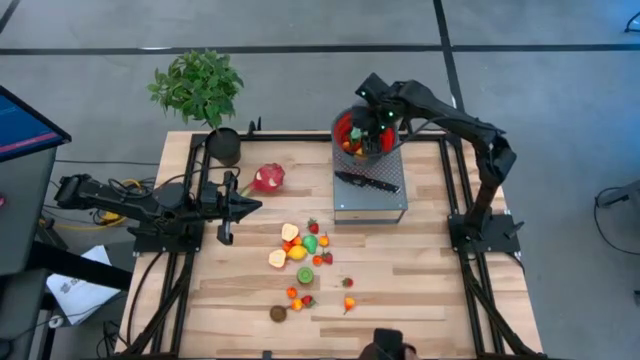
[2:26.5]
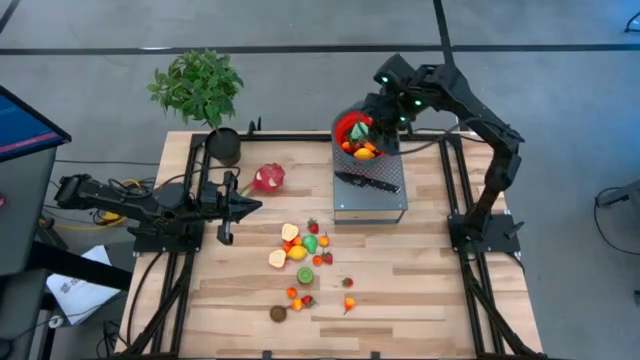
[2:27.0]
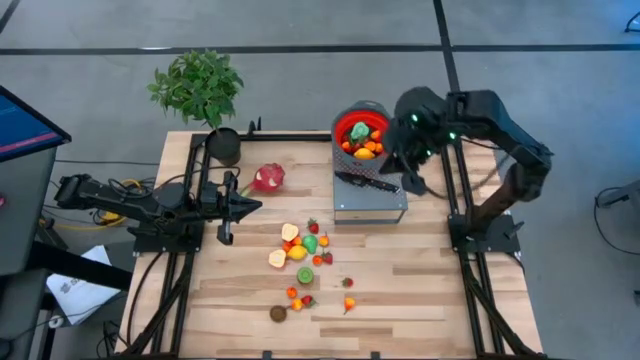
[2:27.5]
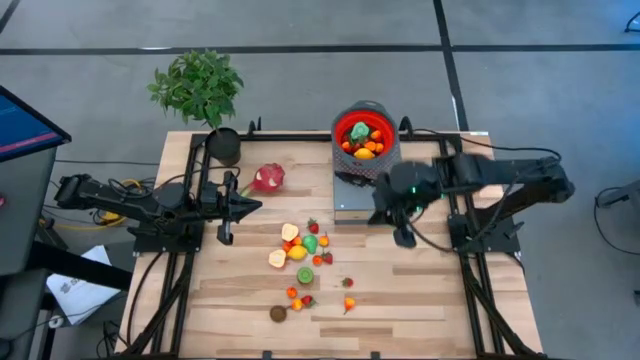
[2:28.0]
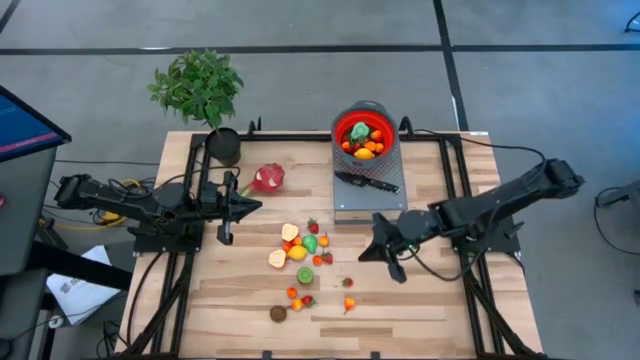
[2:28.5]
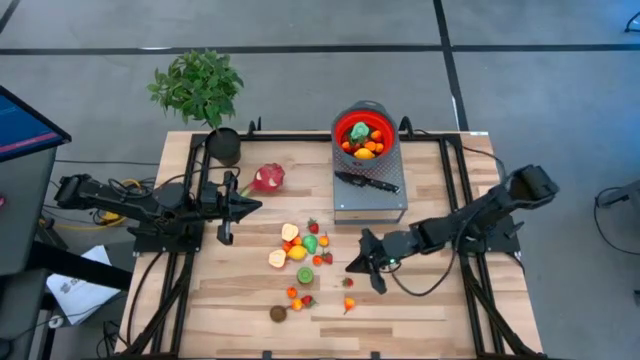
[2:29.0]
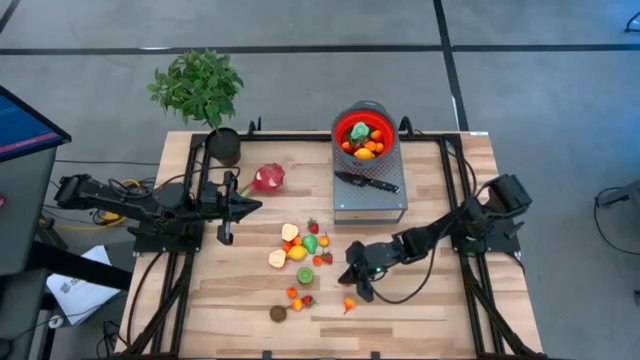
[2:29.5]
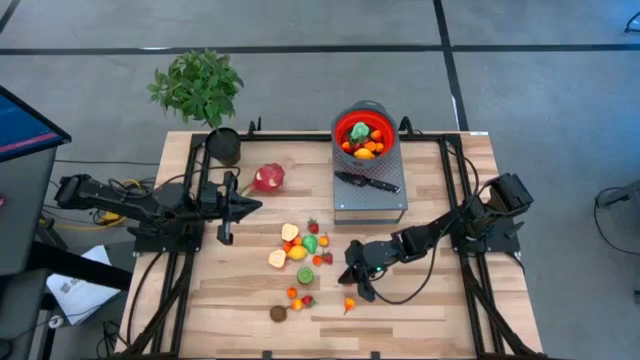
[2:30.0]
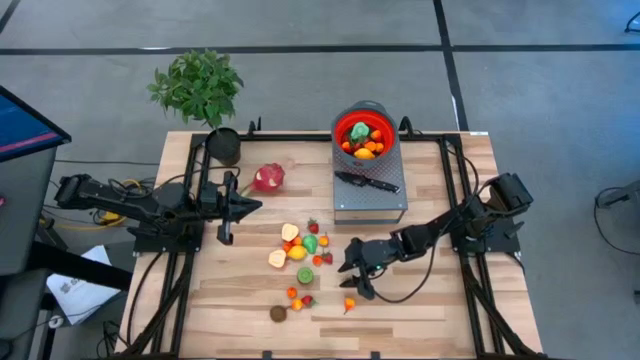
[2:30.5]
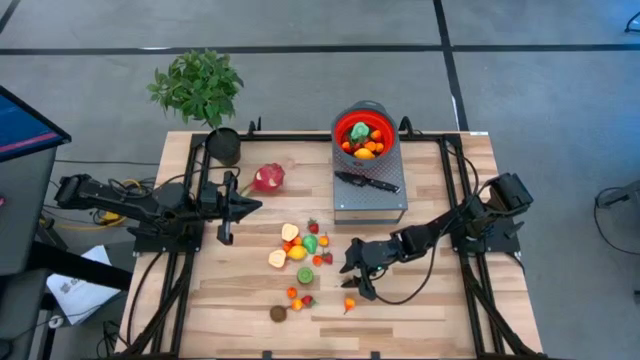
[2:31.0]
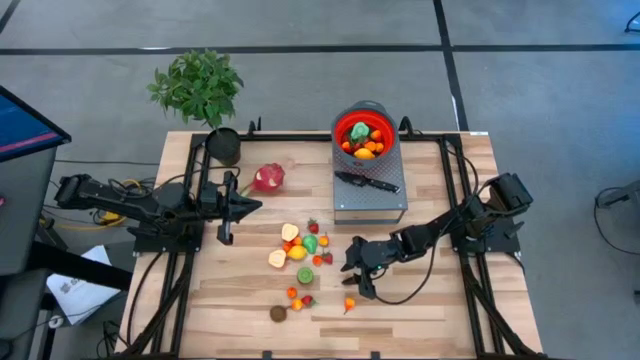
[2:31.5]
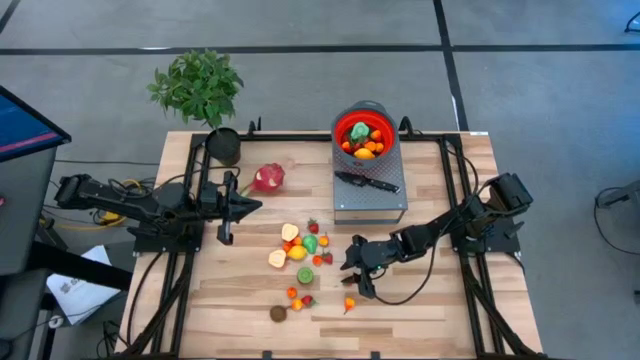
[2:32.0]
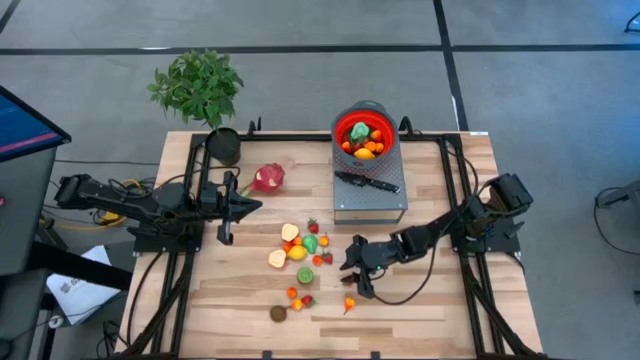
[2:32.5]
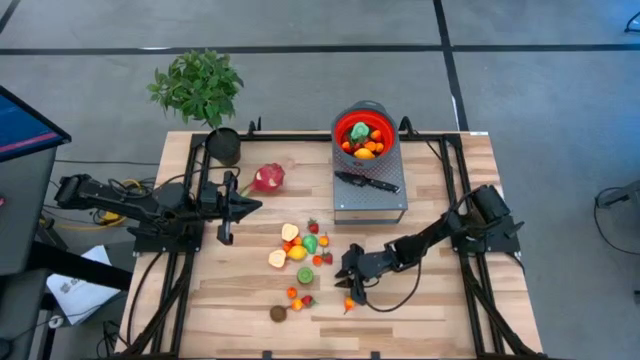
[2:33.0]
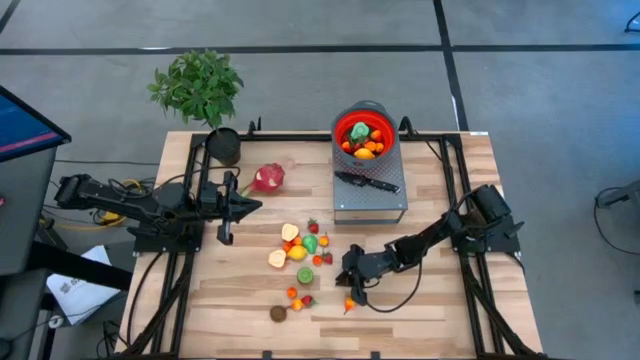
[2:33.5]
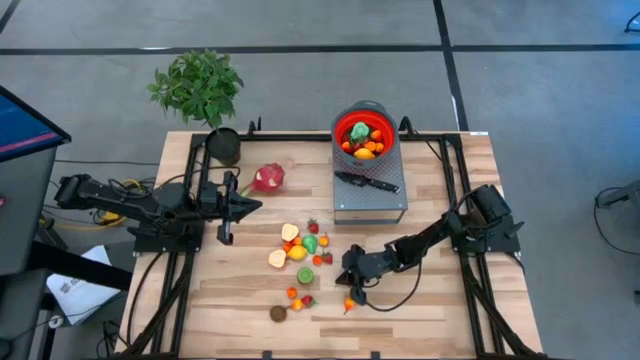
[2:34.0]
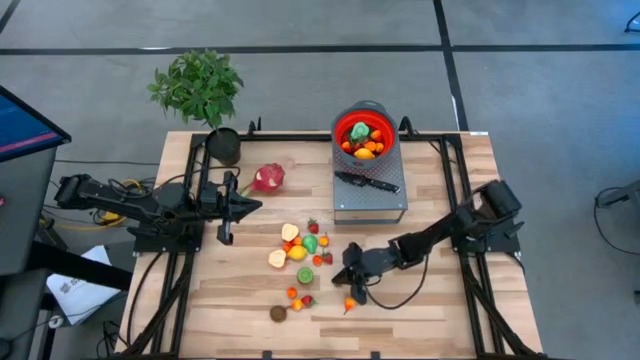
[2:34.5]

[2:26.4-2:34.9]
Task: Pick & Place Fruit
Put the strawberry into the red colander on the shelf

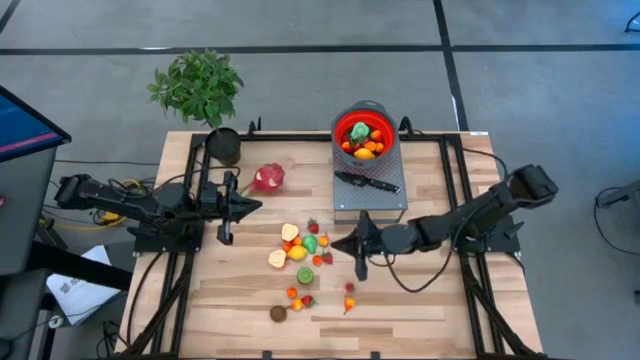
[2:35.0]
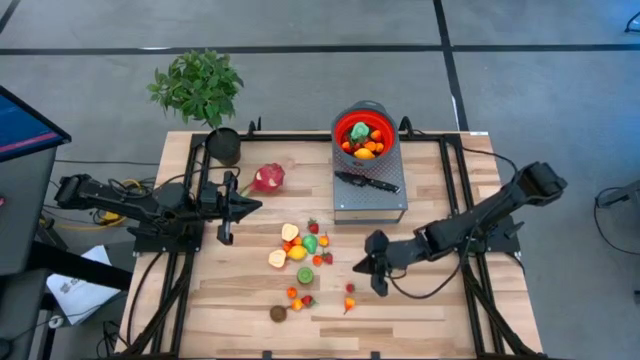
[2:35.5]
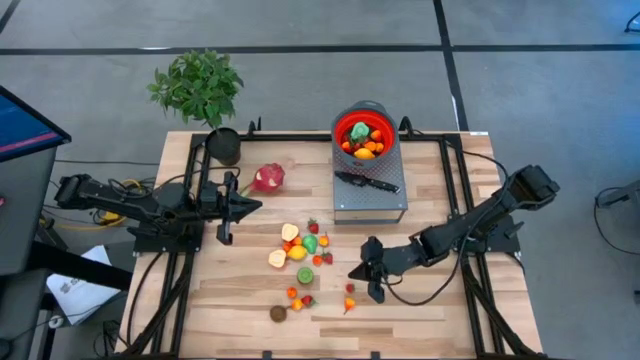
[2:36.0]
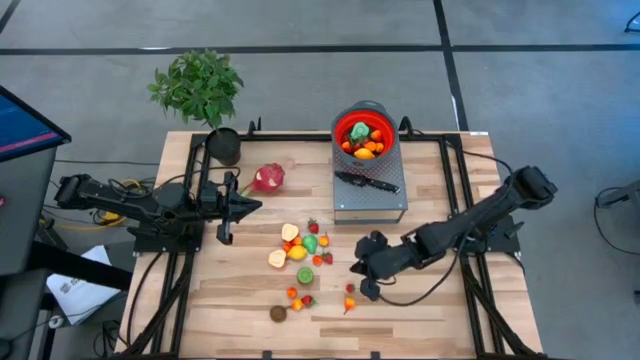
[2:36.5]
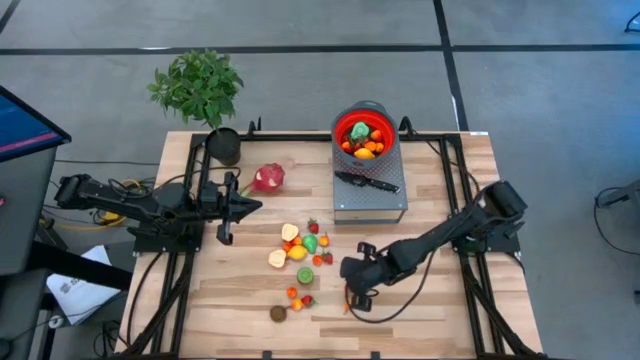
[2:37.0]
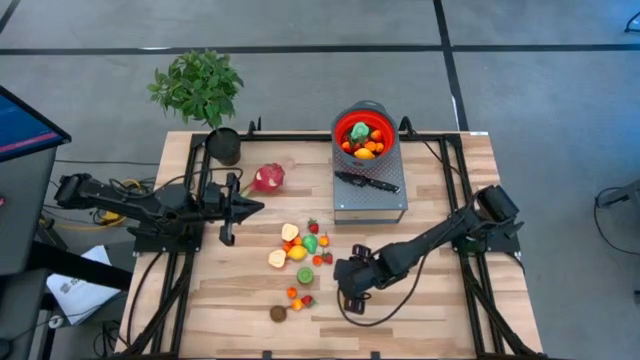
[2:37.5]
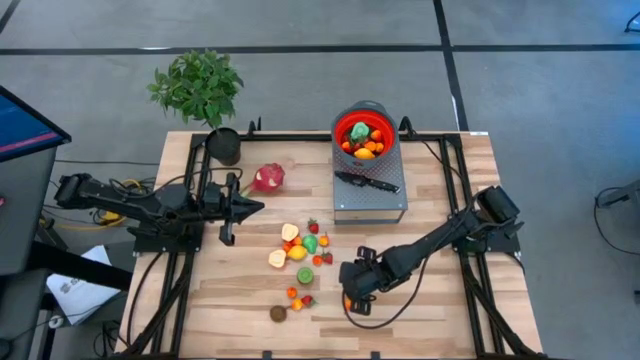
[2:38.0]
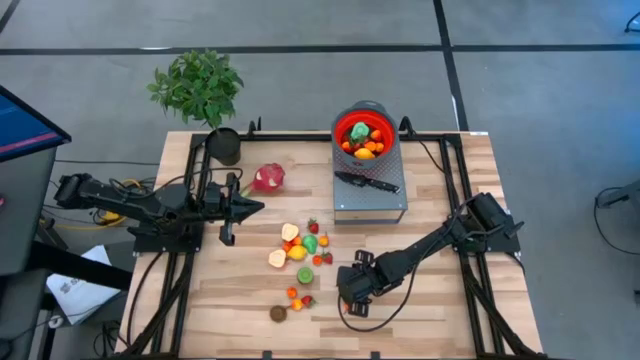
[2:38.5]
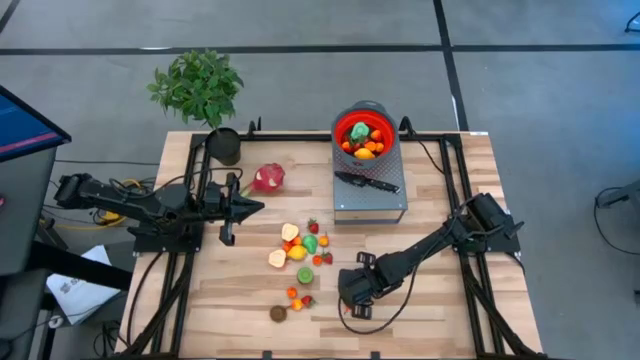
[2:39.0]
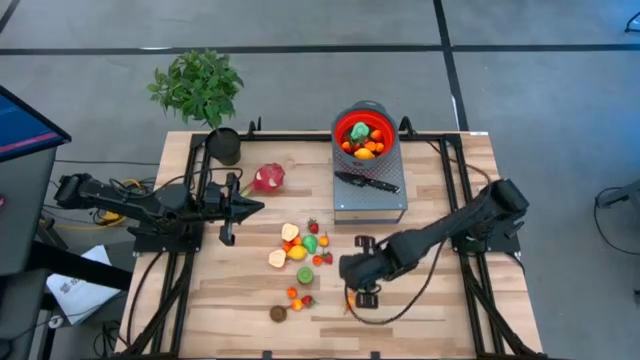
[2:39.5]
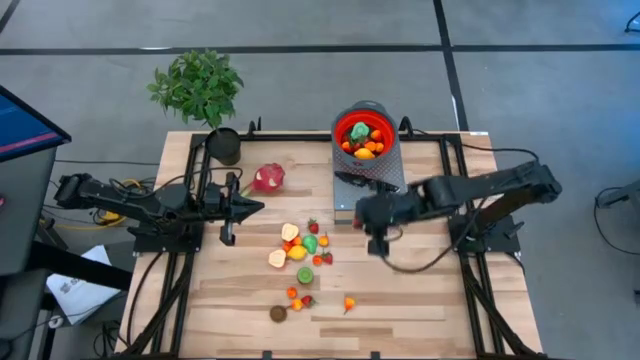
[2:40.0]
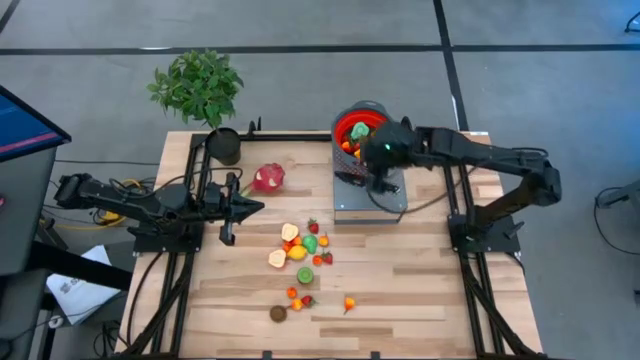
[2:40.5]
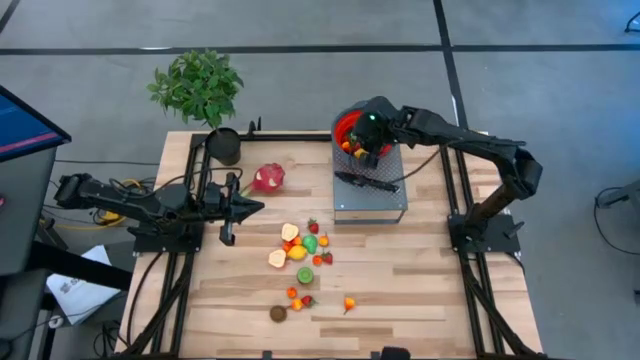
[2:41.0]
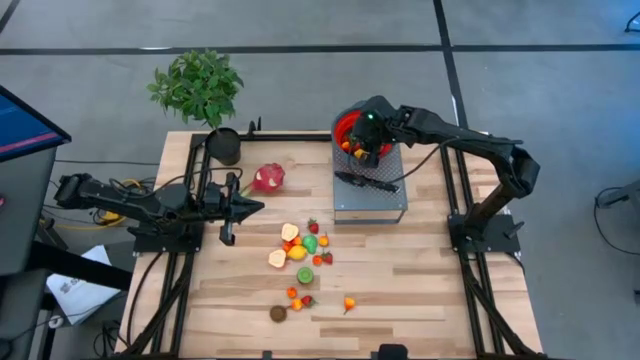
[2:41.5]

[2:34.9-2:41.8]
Put the strawberry into the red colander on the shelf

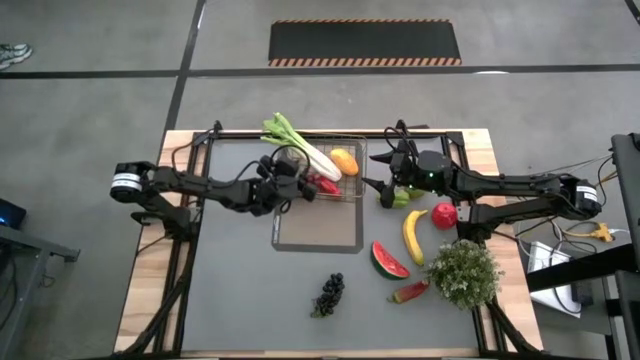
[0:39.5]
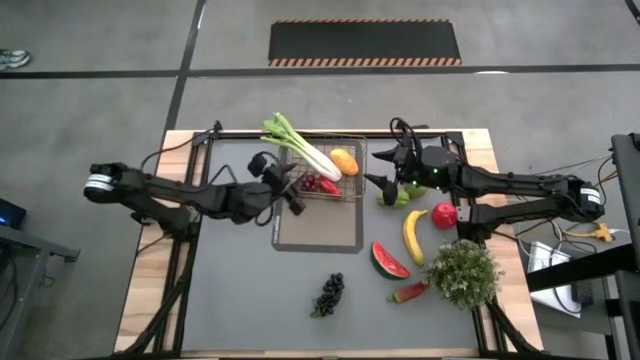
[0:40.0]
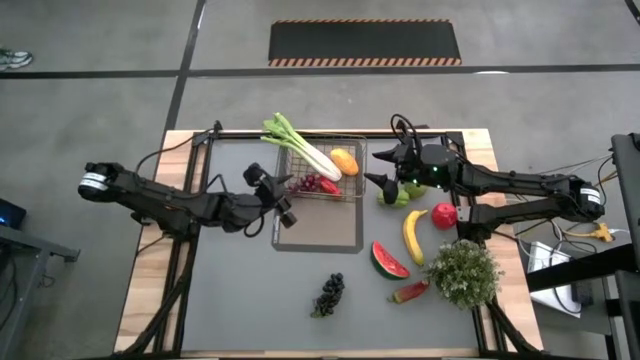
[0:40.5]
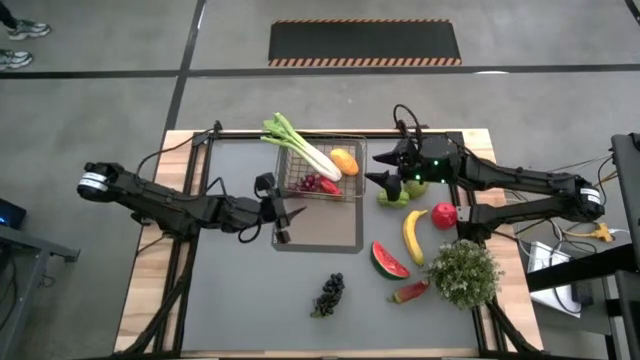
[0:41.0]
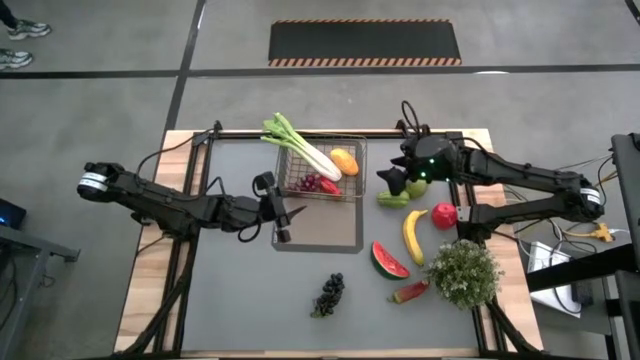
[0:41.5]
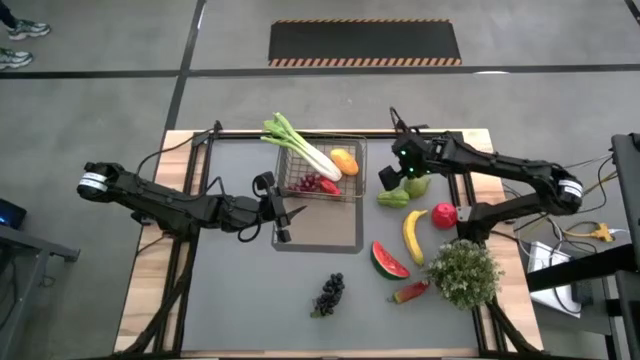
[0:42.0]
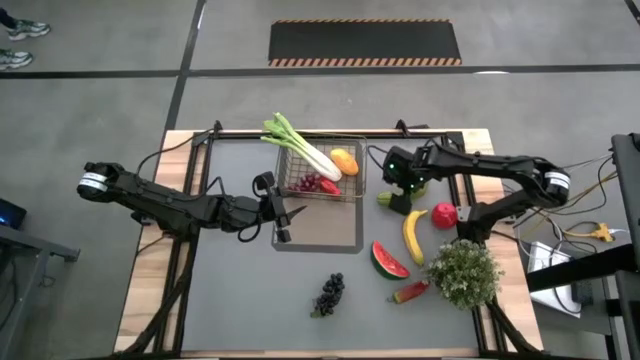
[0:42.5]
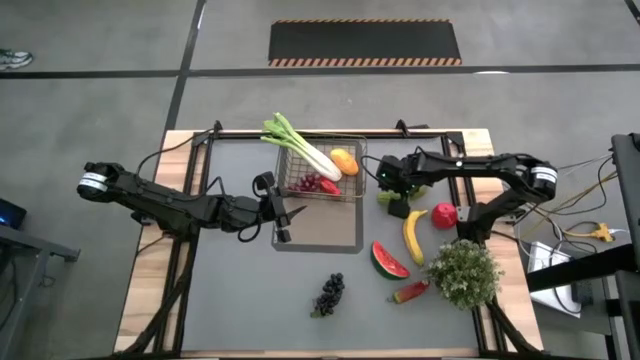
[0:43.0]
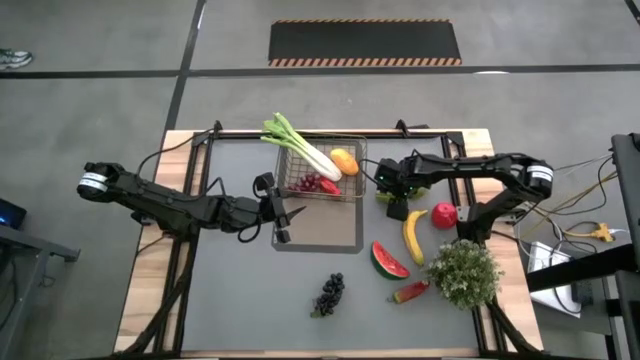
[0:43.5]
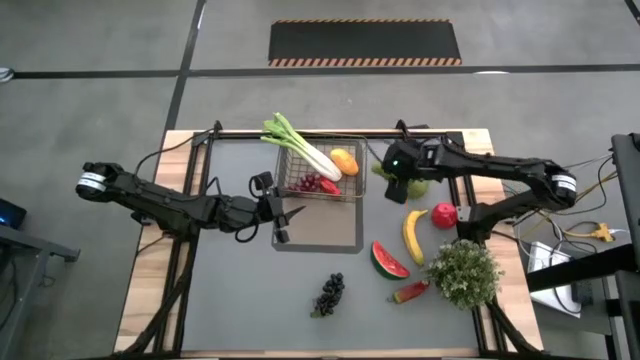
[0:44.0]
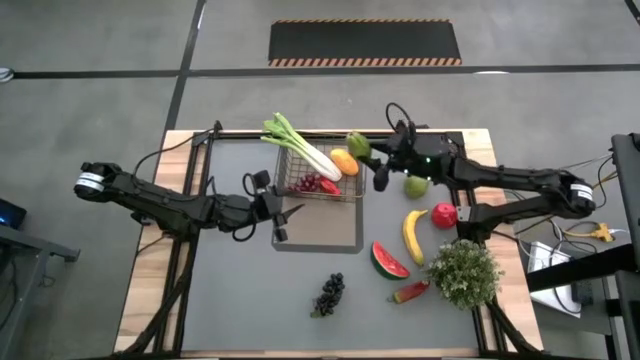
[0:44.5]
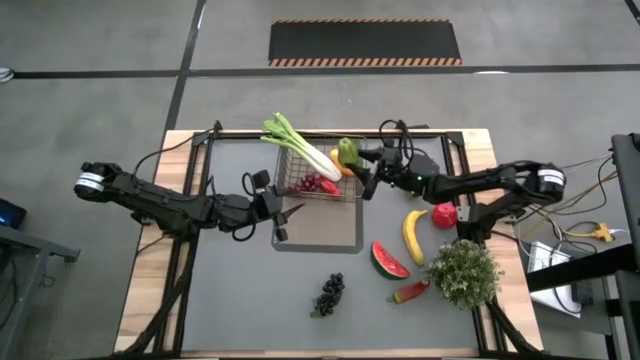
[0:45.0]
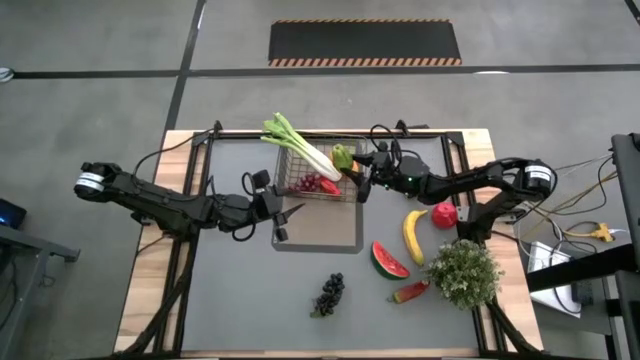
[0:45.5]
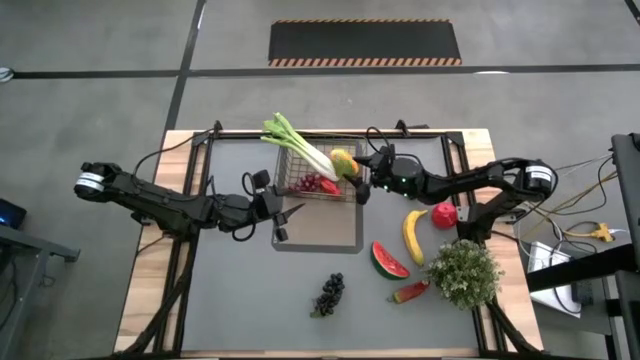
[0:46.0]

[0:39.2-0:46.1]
Task: Build produce basket
Put the chayote into the wire basket
